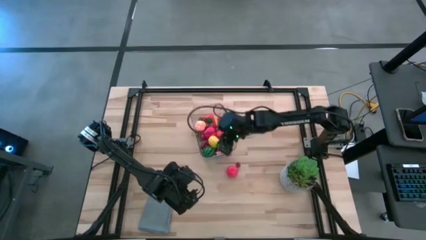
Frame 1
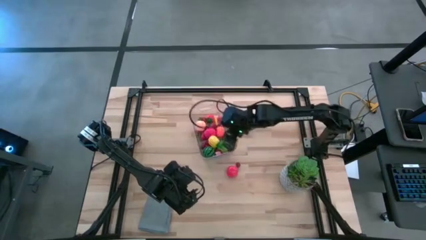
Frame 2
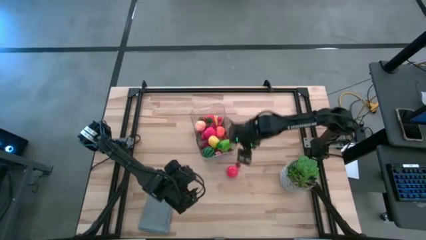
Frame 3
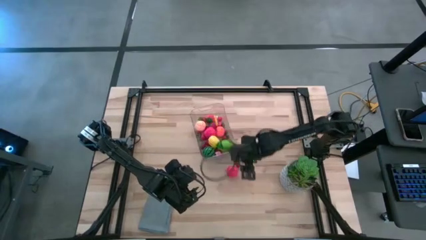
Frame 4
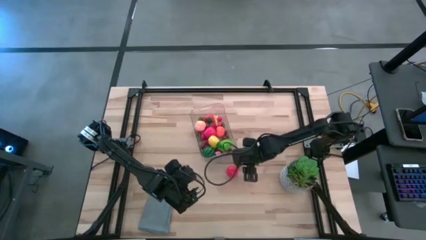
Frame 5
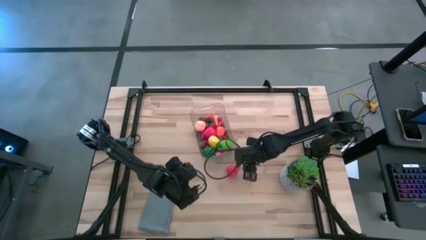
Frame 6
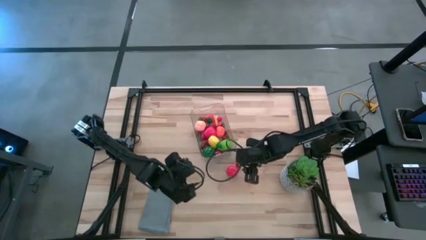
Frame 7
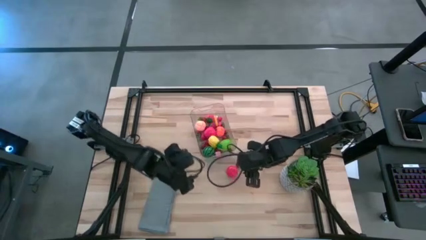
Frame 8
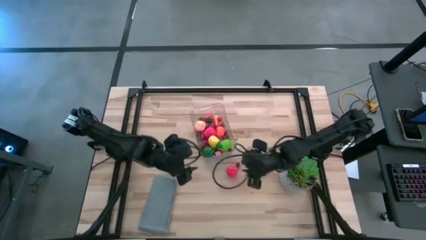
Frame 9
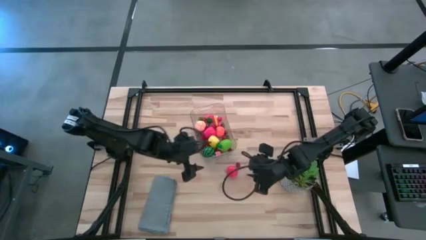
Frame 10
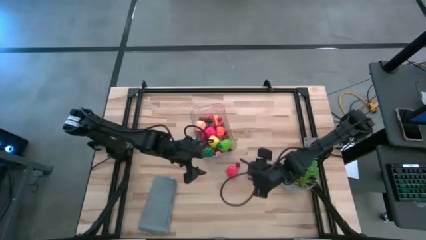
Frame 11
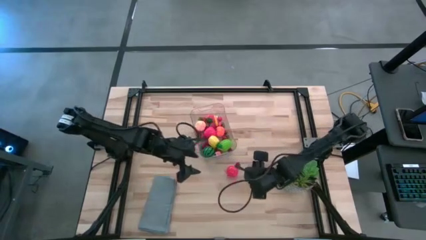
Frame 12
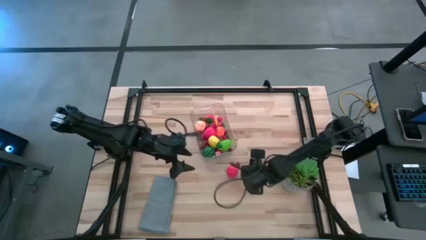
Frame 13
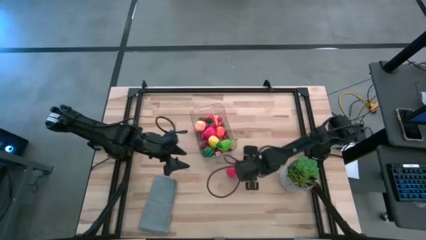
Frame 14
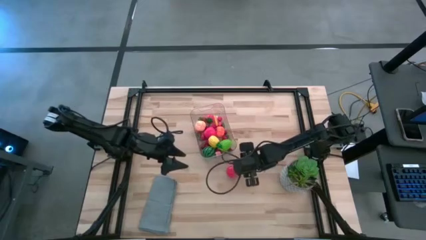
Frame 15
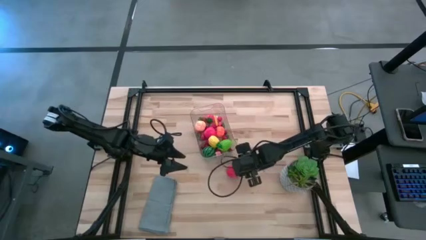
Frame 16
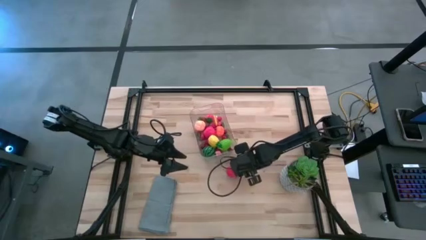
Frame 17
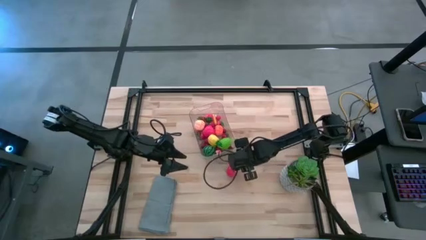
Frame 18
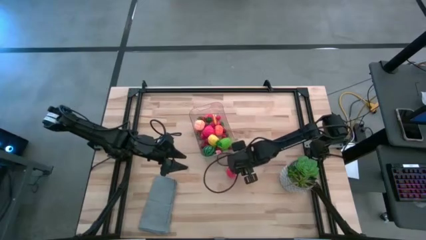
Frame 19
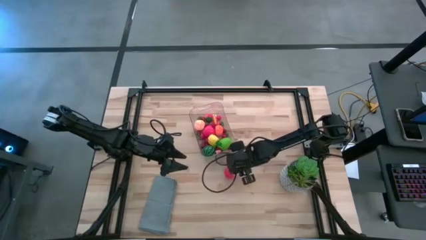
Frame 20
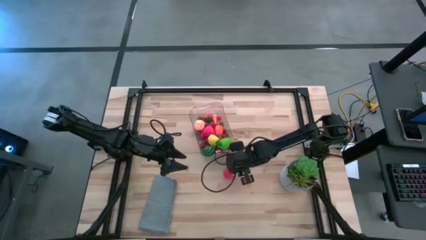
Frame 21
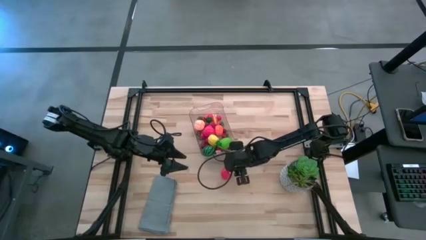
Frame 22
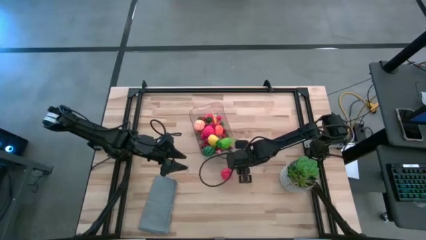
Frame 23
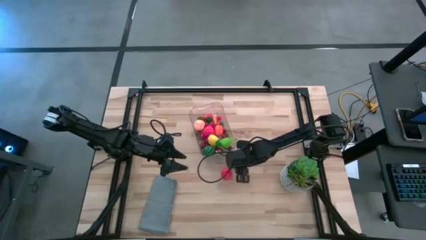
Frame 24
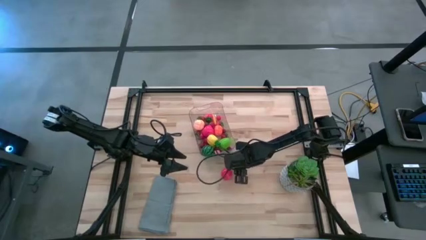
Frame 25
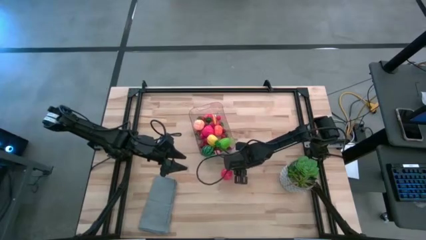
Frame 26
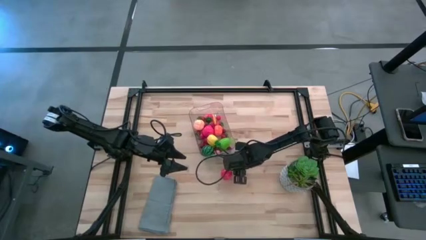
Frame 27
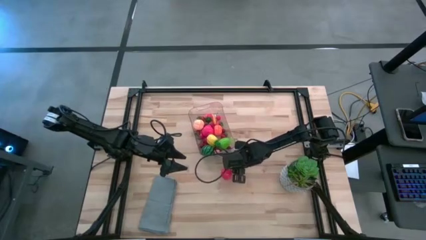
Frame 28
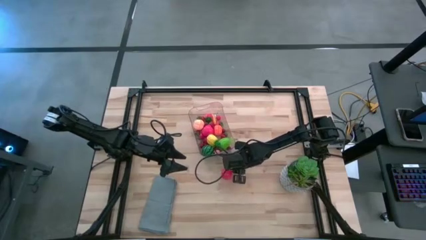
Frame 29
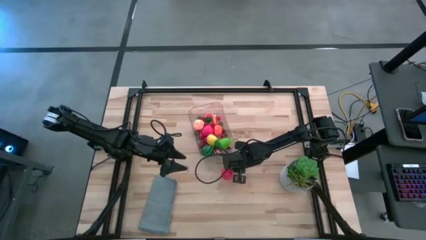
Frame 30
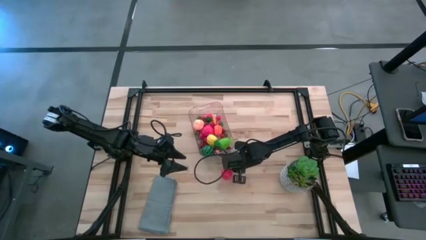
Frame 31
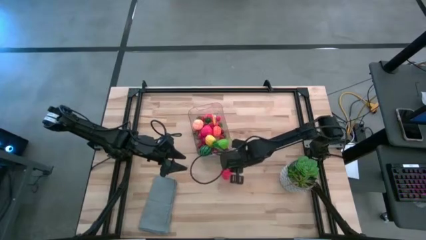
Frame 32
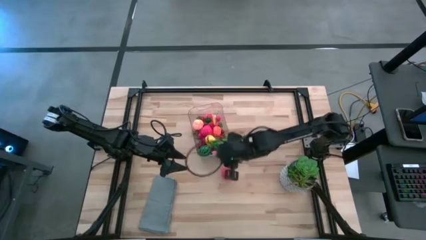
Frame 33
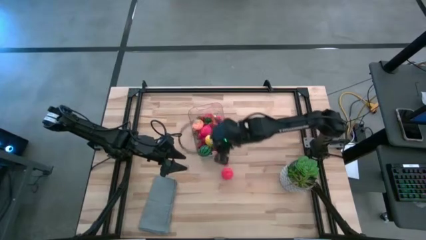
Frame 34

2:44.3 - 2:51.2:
Task: Pick and placing Produce into tupperware
Put the red cherry into the transparent container

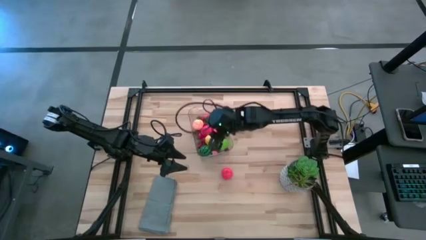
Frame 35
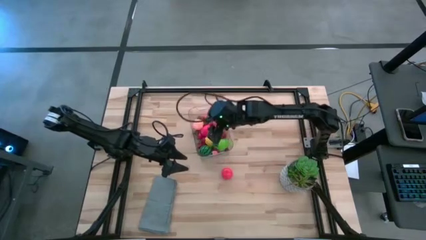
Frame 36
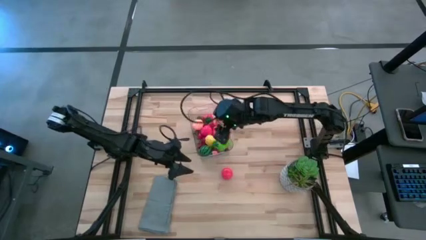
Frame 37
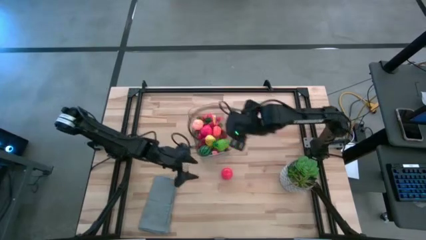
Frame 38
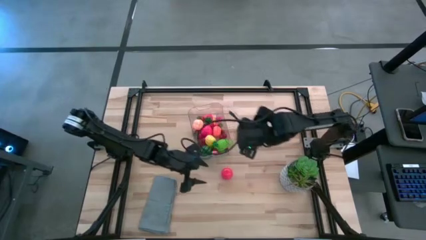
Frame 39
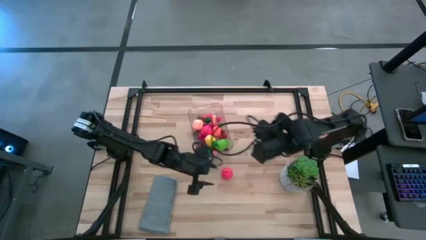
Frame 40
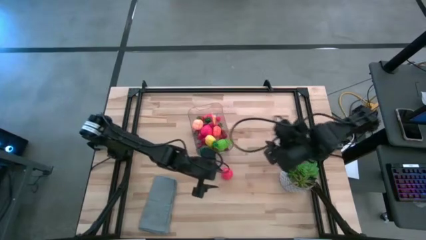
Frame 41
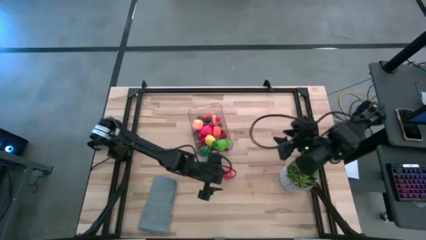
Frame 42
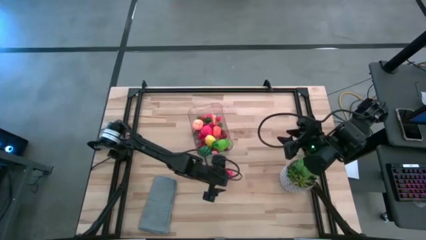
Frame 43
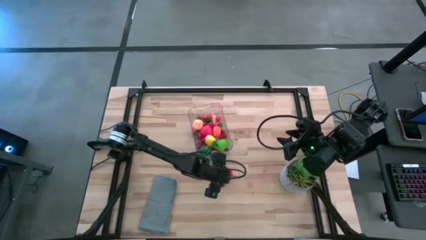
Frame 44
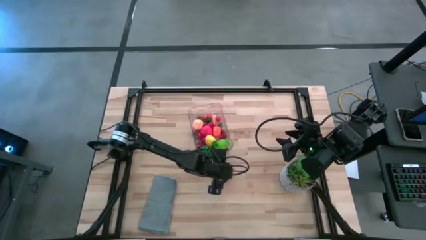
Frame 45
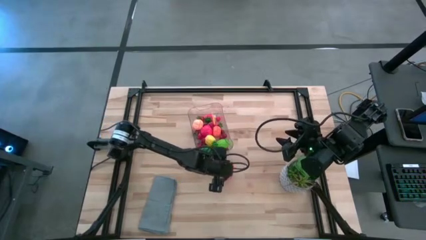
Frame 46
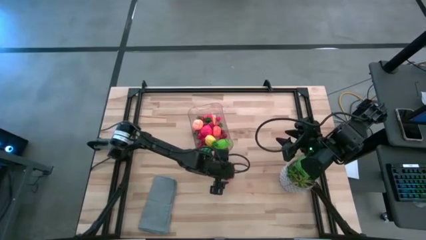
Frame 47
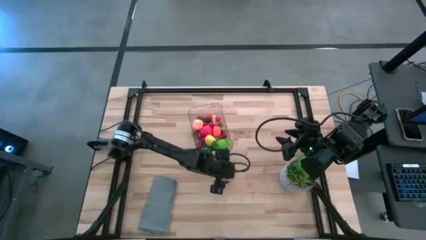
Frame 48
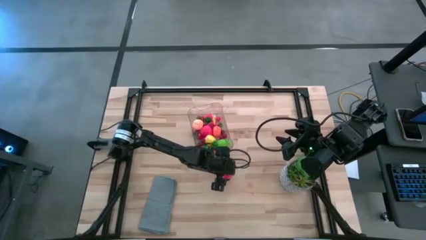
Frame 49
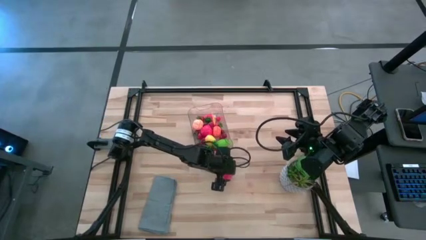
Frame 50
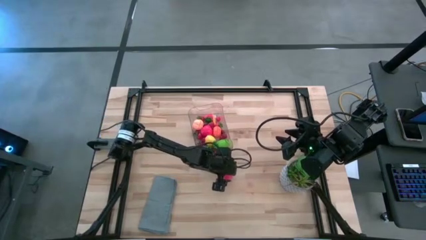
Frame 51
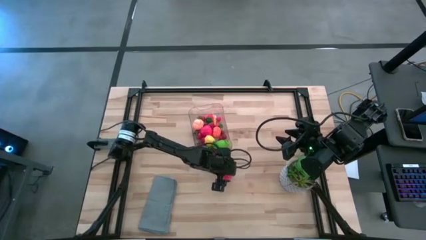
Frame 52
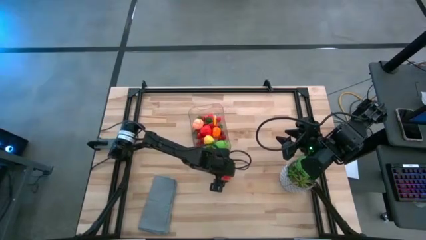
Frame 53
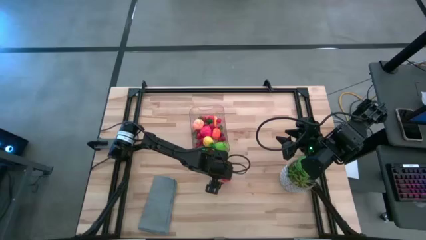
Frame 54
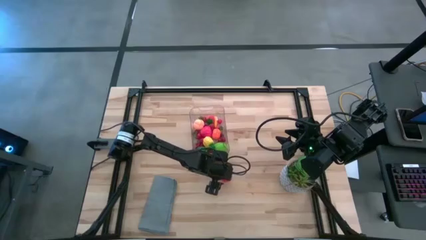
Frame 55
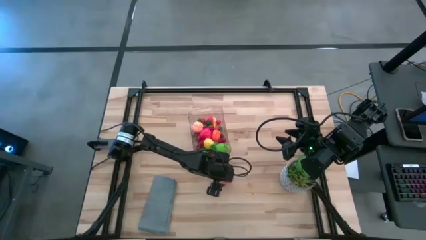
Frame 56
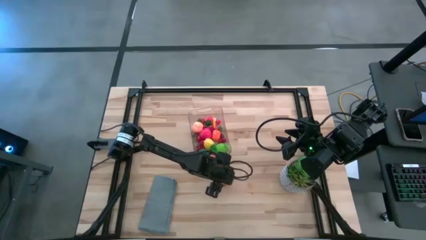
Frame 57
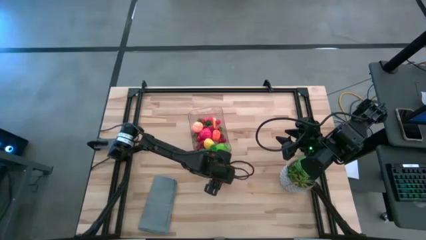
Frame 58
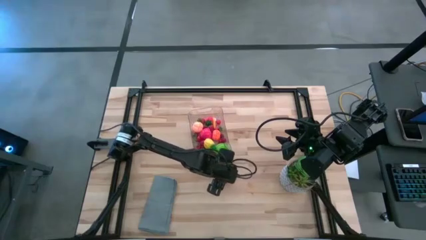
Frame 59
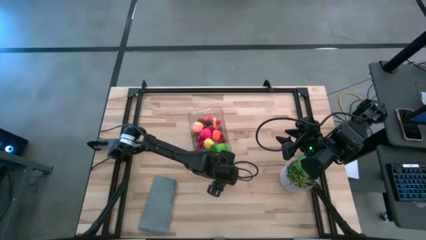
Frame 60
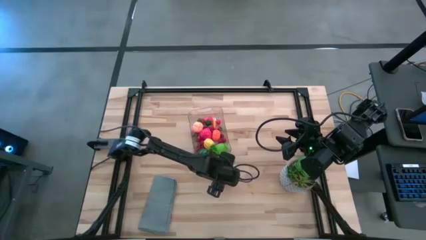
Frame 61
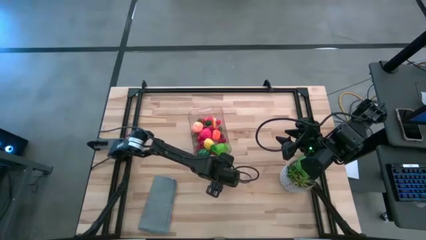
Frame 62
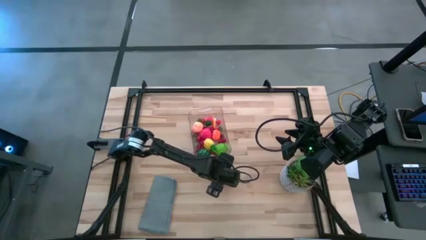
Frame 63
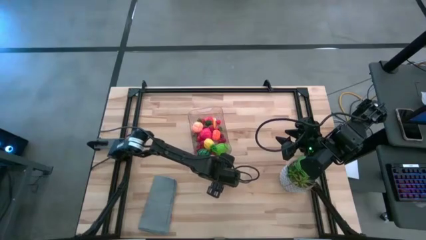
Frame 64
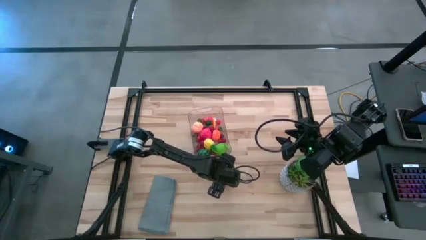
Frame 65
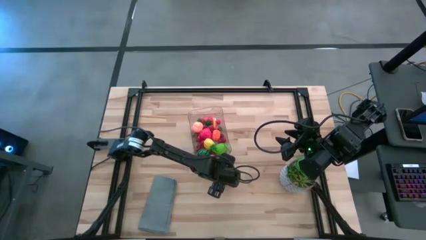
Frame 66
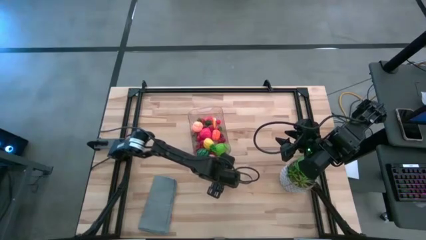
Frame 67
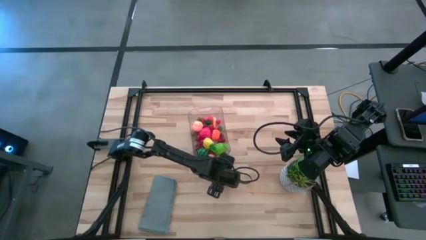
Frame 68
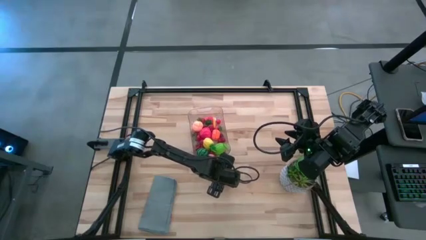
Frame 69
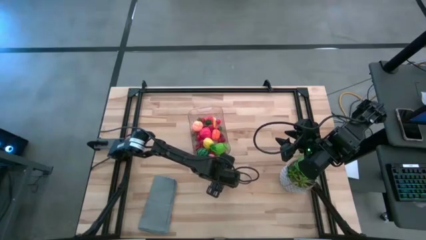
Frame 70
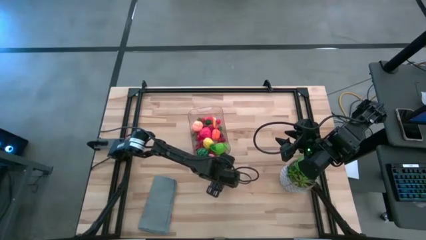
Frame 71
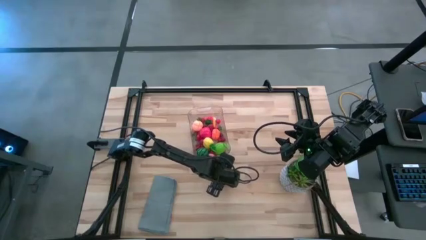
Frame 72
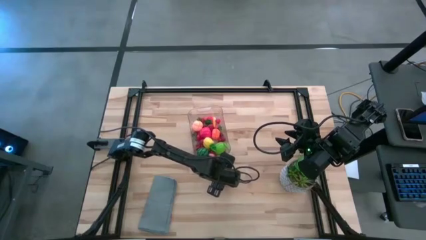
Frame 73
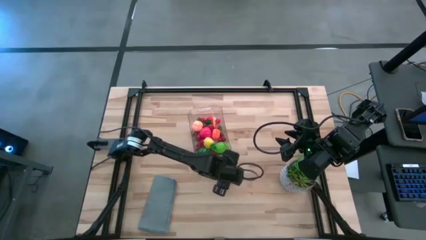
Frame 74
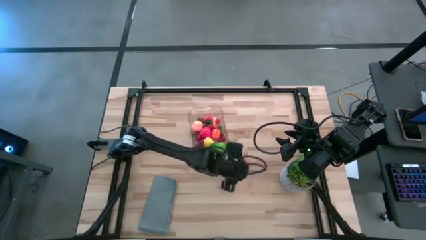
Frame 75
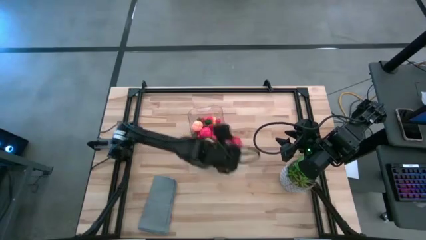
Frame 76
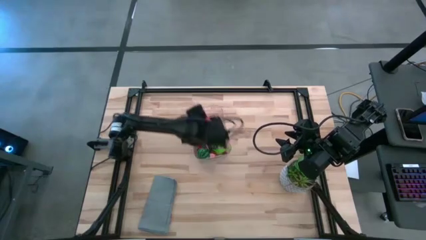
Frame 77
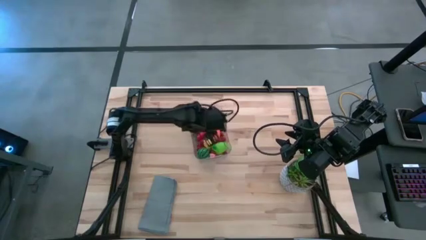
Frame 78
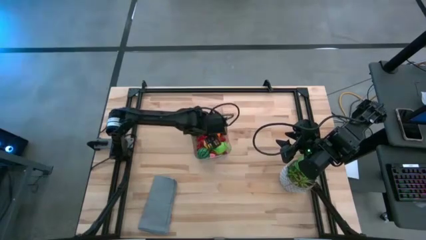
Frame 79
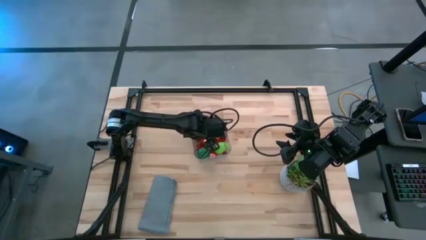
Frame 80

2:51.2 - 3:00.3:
Put the red tomato into the transparent container

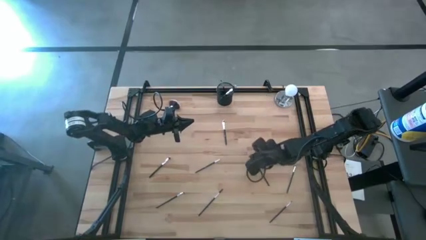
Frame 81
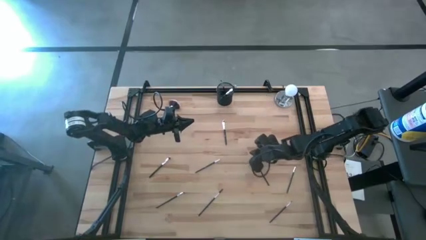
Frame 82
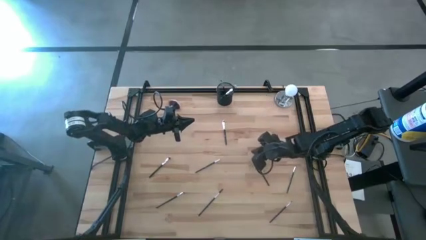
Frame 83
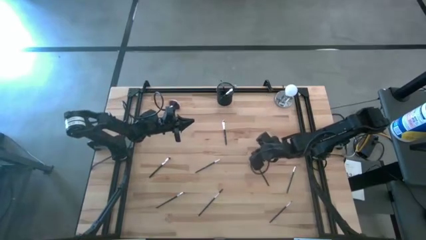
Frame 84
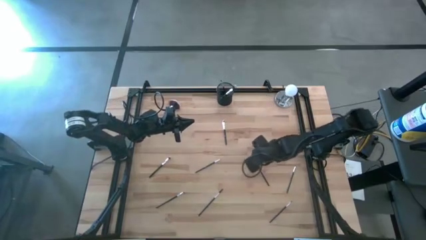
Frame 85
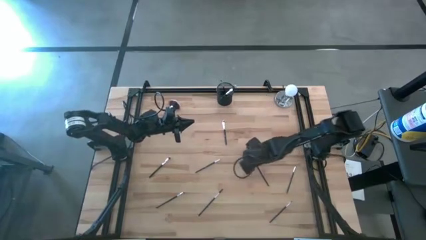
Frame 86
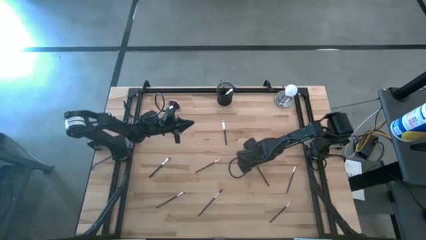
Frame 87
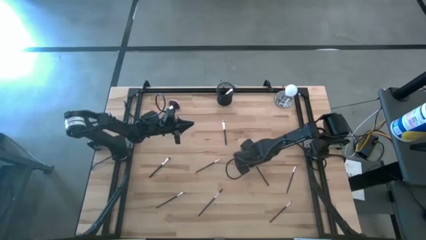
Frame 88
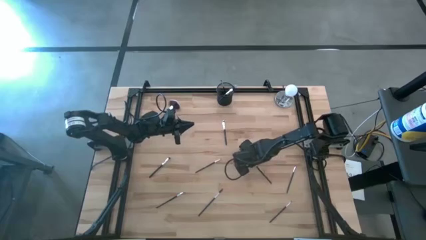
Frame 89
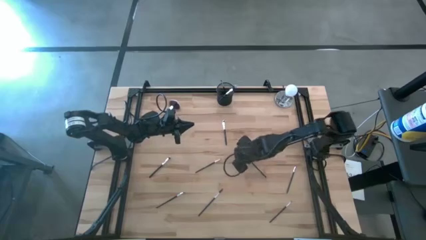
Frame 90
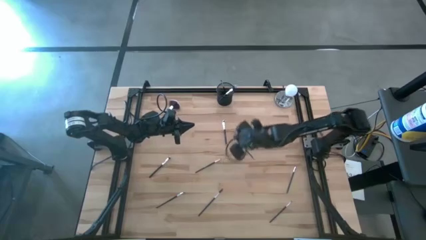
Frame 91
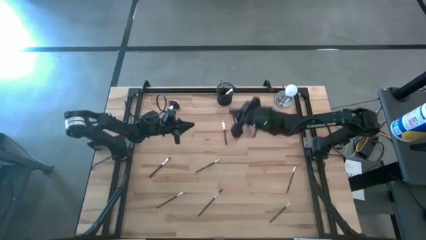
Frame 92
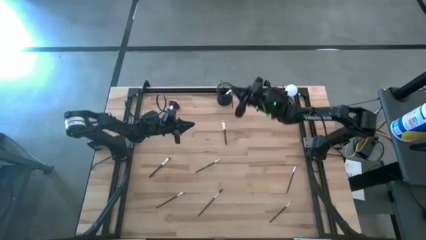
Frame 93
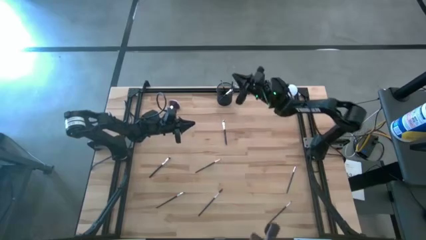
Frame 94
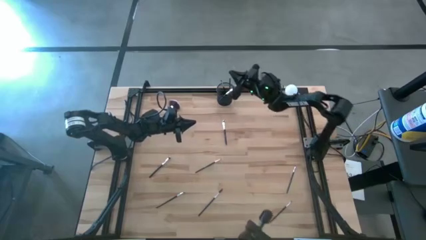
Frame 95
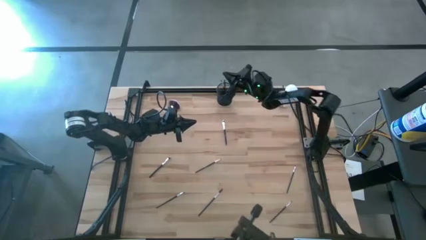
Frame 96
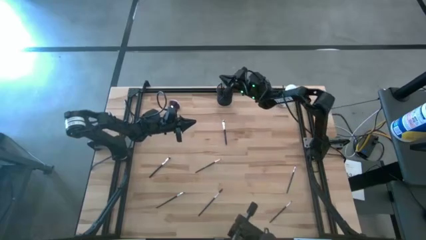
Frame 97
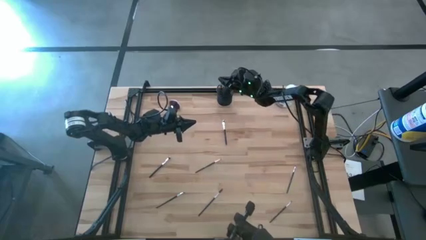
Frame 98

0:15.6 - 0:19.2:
Task: Put items in baskets/containers
Put the black eyeshadow brush into the black pen holder
